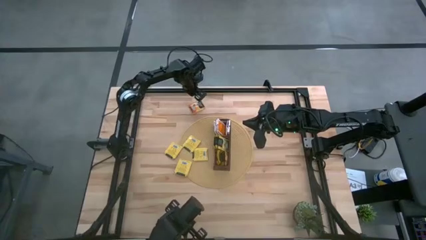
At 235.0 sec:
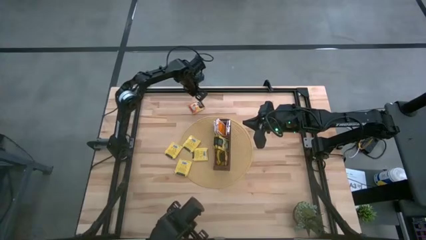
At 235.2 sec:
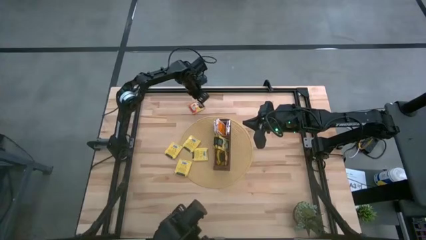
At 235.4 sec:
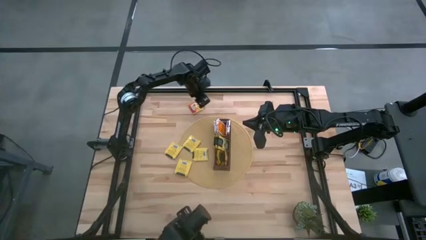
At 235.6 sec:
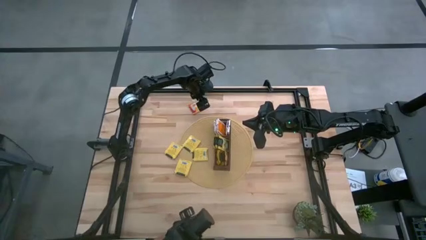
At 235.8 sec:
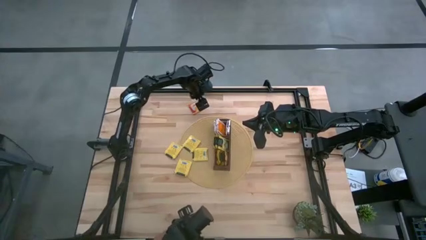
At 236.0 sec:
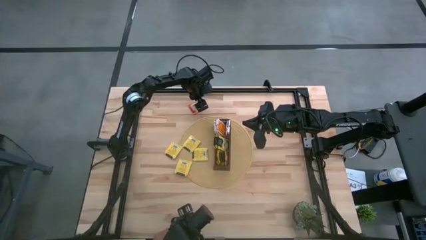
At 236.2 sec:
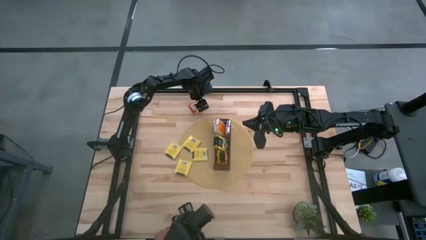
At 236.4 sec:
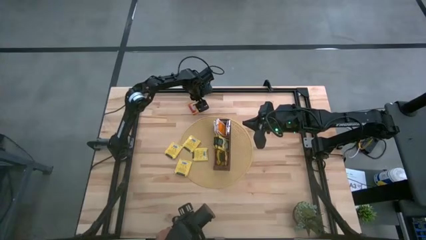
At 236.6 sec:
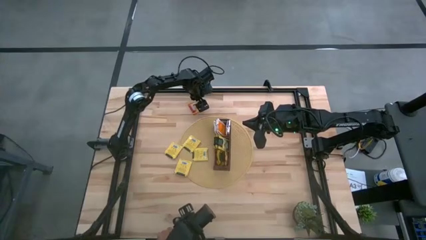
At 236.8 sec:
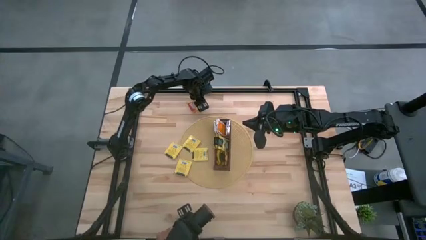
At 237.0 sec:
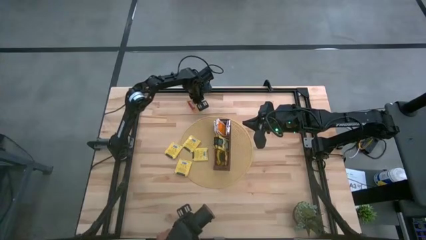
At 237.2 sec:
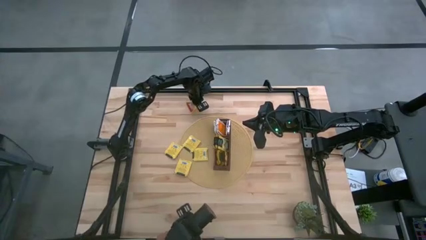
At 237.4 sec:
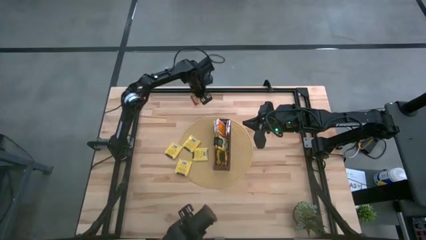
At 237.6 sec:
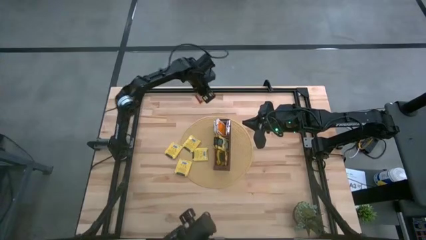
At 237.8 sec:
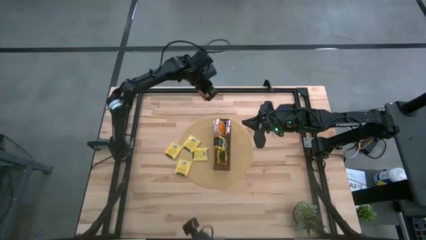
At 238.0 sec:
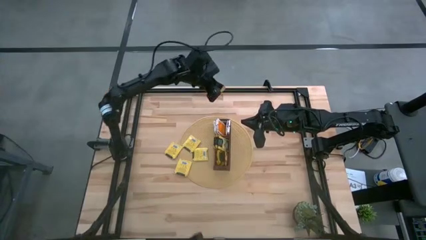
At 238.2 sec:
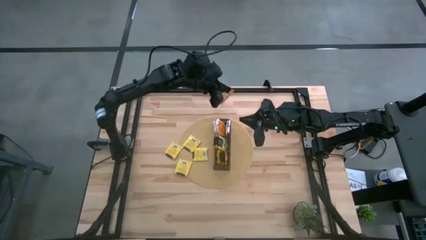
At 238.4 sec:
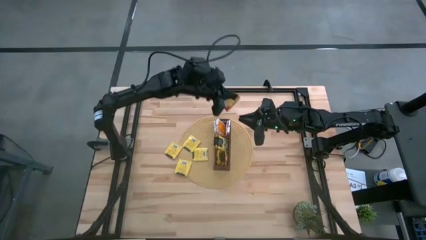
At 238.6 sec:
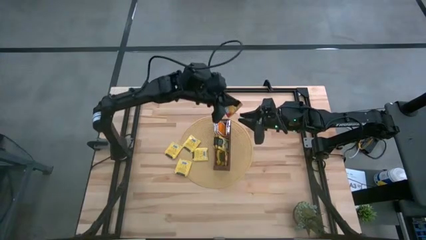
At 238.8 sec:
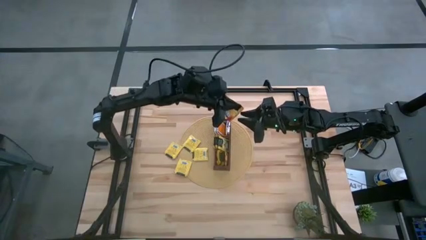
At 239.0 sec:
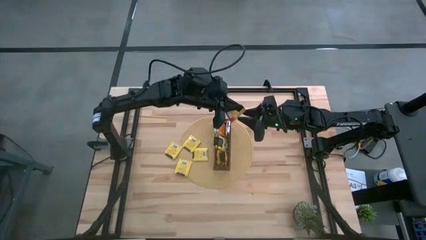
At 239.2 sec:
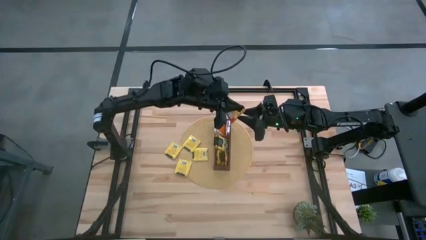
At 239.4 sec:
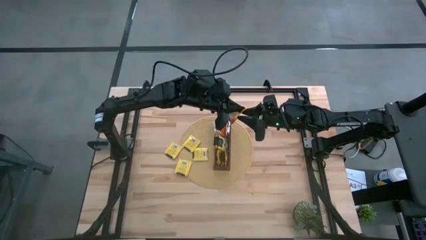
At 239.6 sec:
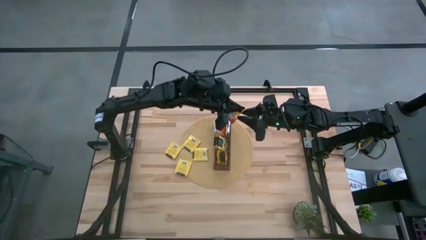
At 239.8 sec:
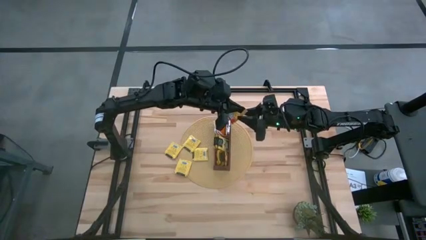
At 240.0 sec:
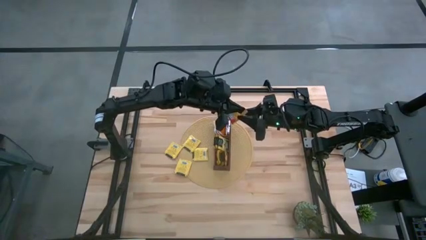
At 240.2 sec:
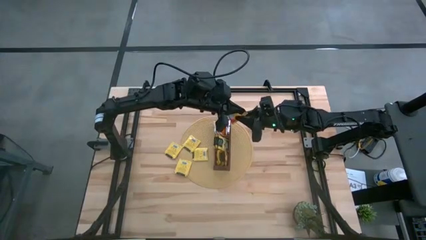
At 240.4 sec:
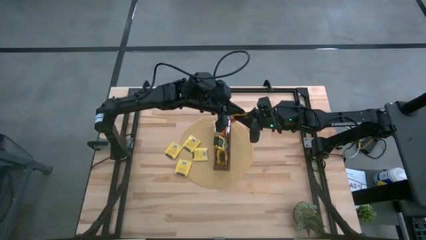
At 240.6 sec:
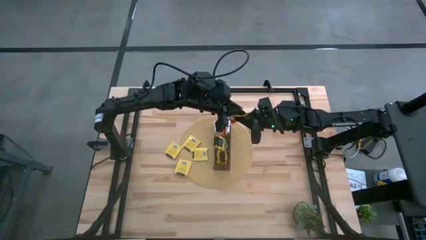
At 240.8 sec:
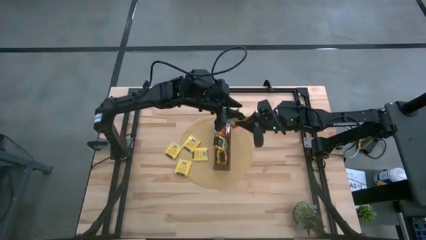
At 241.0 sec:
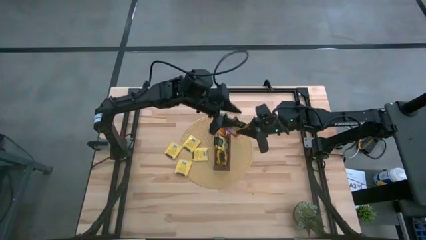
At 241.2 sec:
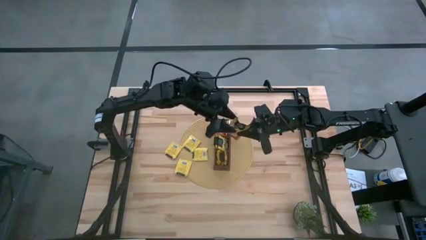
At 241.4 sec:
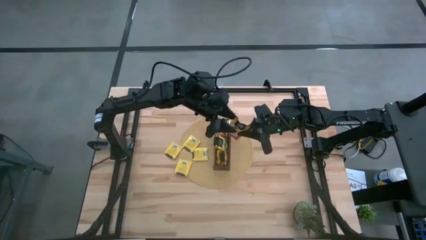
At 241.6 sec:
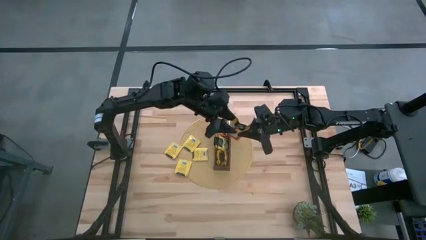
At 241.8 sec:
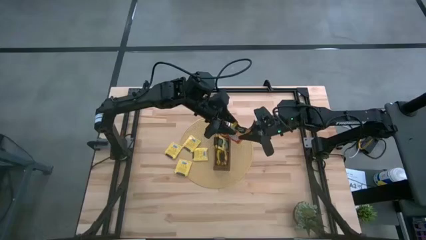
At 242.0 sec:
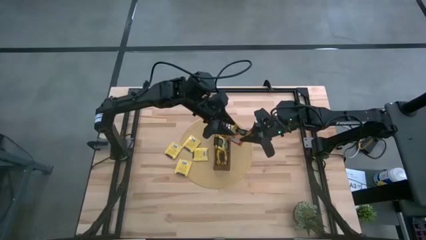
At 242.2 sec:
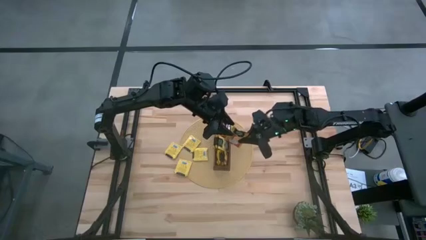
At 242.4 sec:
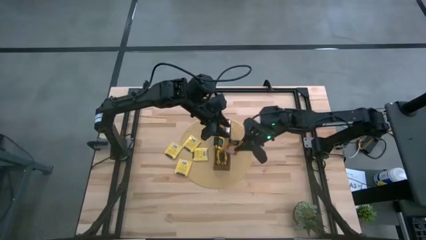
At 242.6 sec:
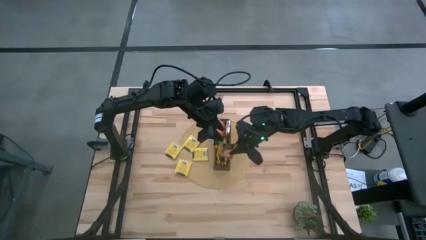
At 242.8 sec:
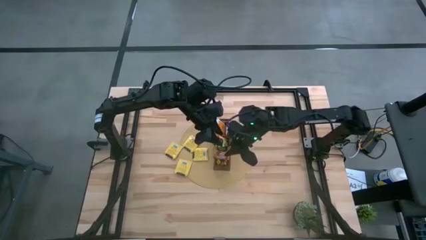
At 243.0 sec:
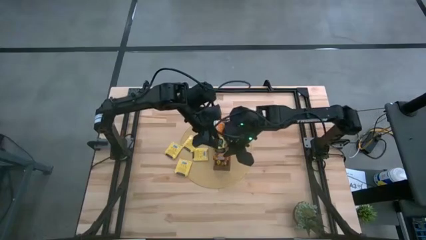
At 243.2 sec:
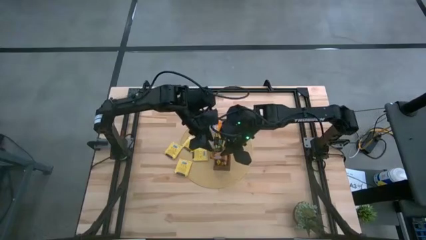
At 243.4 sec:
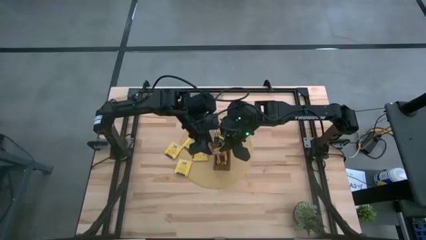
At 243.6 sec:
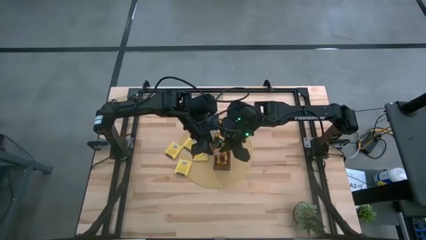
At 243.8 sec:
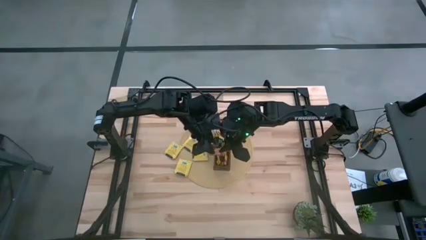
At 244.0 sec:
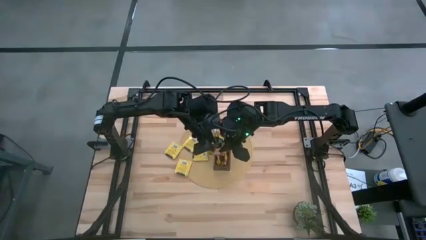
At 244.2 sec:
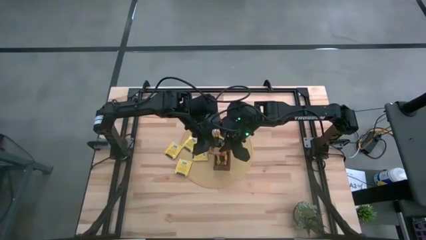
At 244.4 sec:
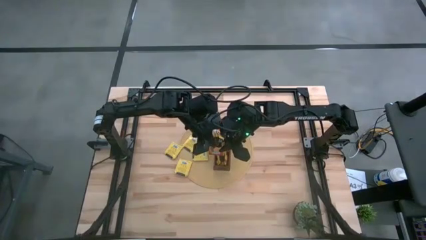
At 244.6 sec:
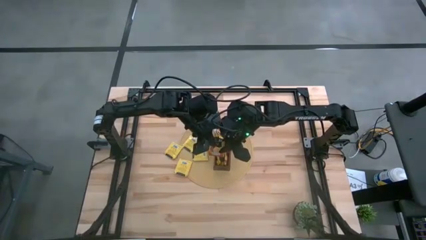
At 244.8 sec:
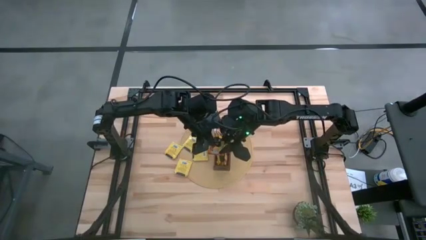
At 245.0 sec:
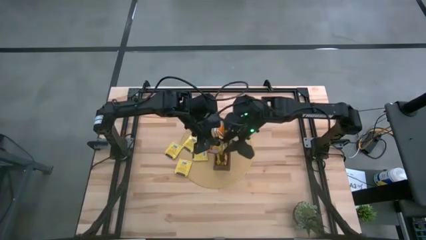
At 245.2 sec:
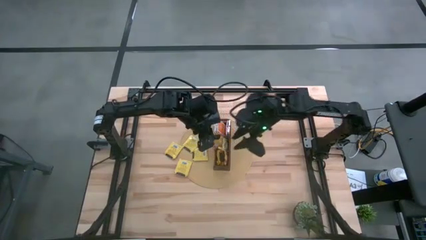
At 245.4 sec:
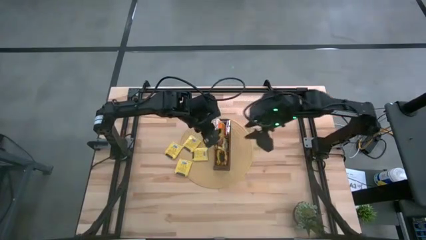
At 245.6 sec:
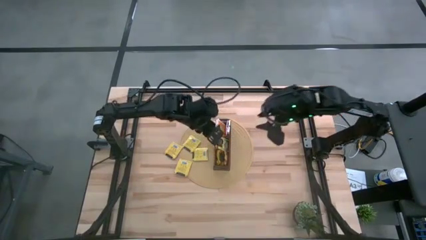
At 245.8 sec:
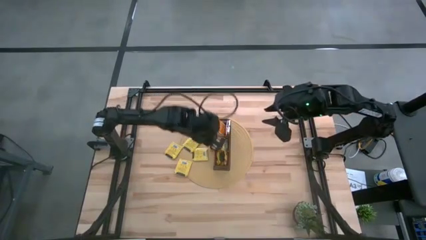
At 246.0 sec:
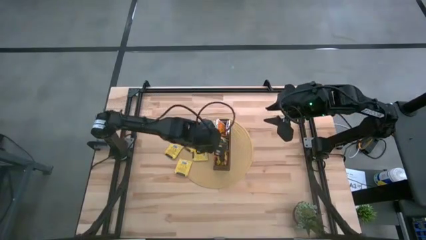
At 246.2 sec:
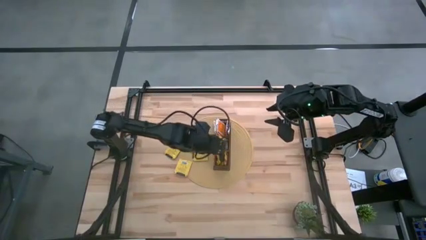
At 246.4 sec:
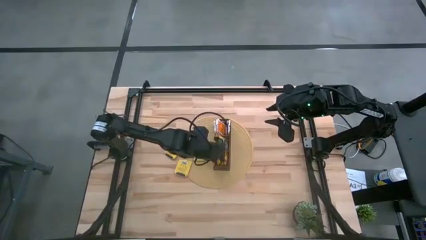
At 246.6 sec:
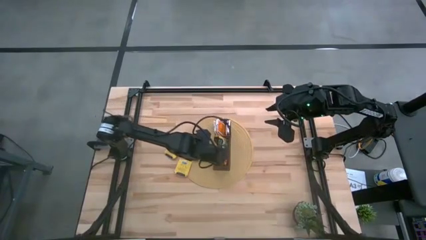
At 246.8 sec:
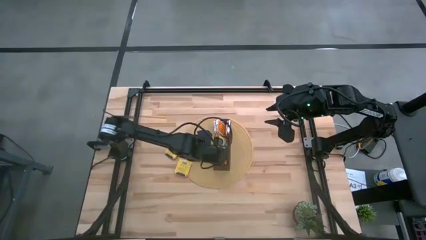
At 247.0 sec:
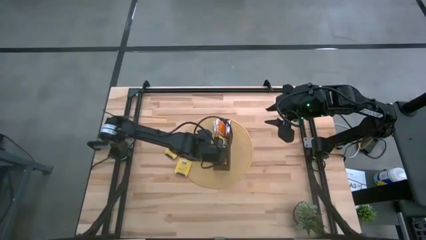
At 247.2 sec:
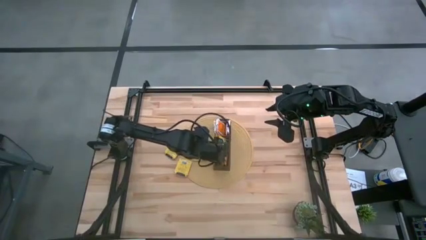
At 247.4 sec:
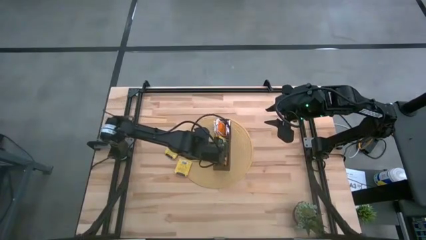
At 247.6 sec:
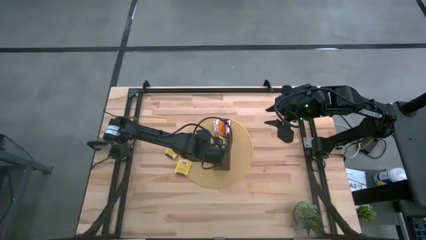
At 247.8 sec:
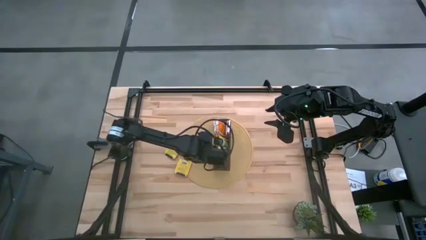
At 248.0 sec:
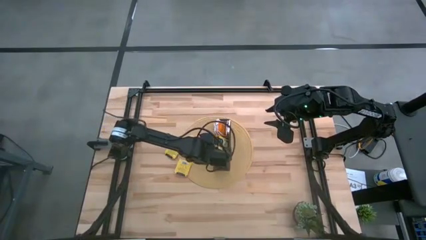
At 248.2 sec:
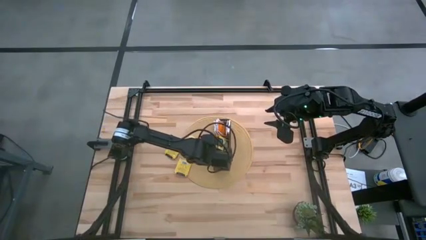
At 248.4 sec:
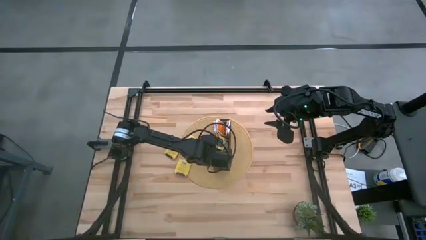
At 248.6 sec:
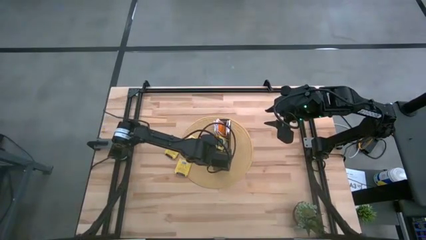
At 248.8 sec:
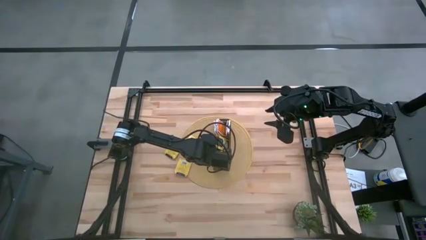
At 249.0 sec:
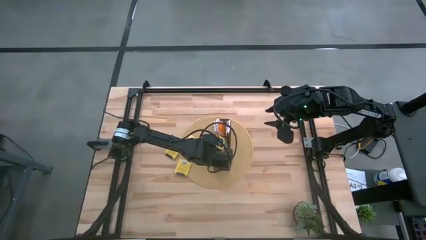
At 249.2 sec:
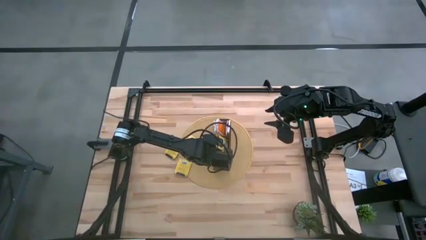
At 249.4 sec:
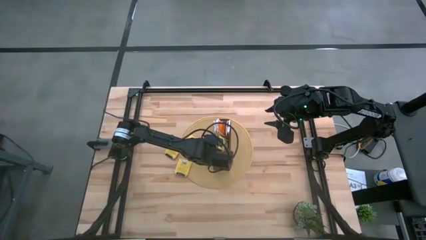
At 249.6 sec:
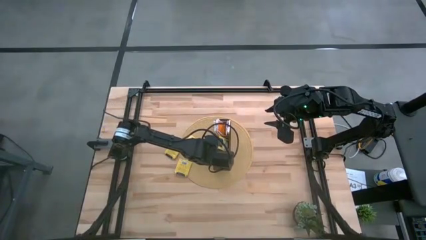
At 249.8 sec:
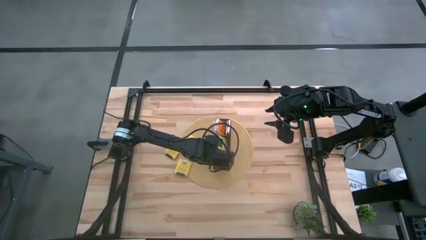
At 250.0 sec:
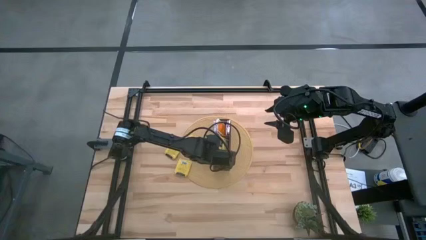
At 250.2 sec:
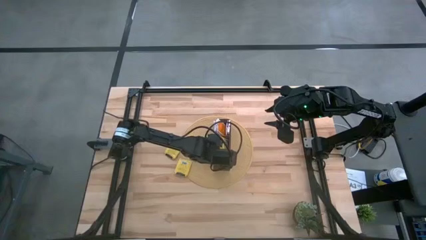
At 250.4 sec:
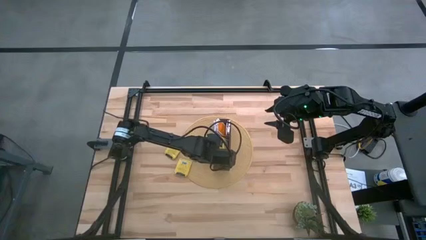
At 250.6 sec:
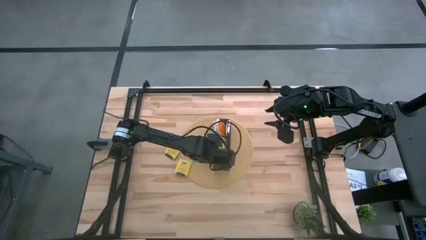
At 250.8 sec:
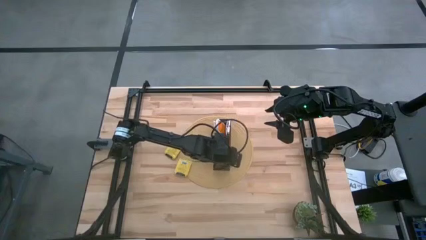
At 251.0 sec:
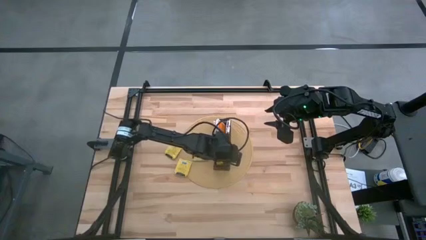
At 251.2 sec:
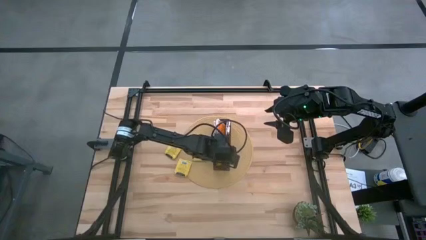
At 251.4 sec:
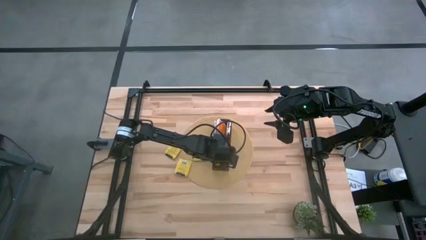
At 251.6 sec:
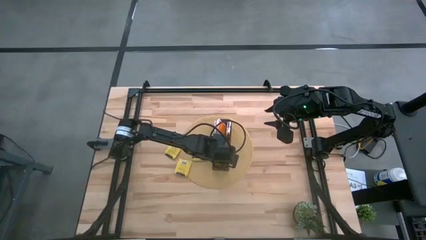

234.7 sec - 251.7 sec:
Task: Pick & Place Tea
Put the orange tea bag into the bottom section of the wooden organizer
